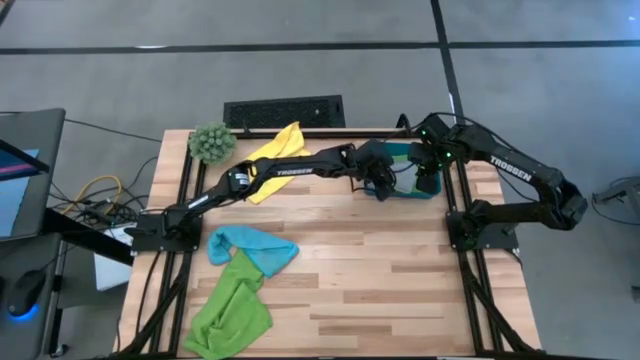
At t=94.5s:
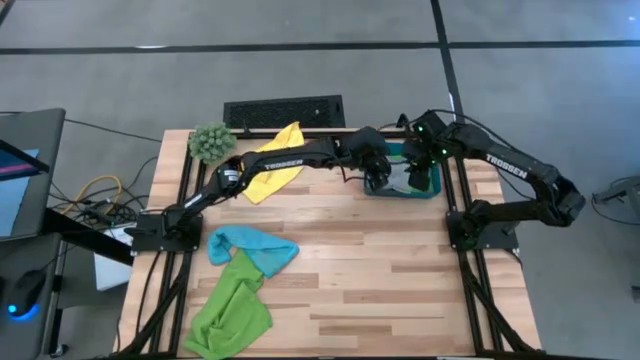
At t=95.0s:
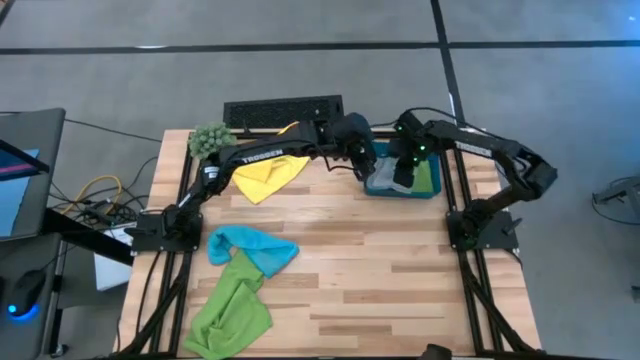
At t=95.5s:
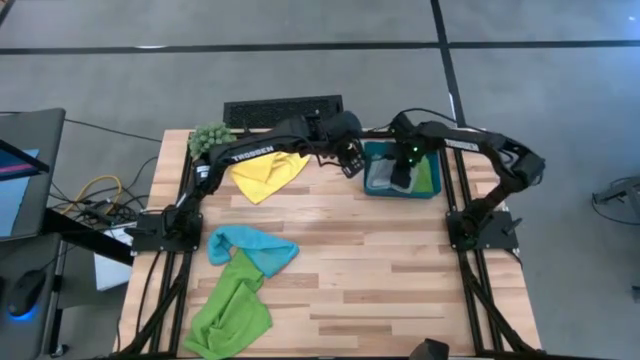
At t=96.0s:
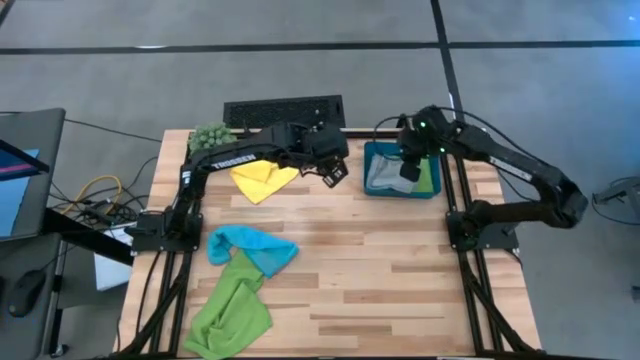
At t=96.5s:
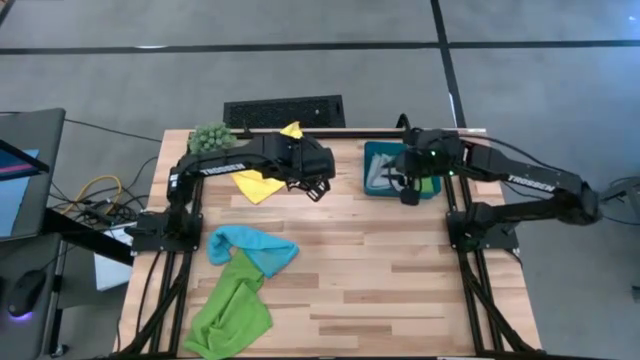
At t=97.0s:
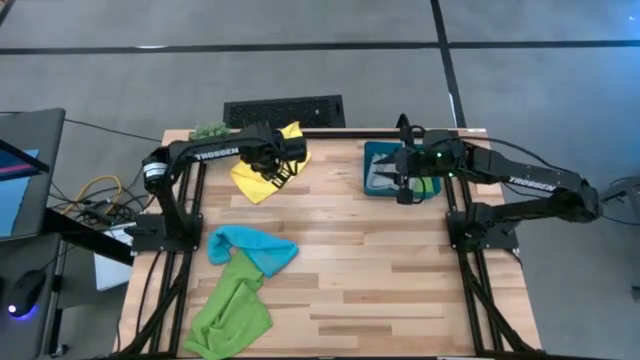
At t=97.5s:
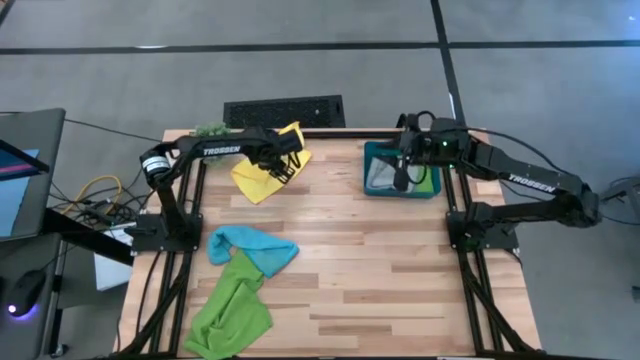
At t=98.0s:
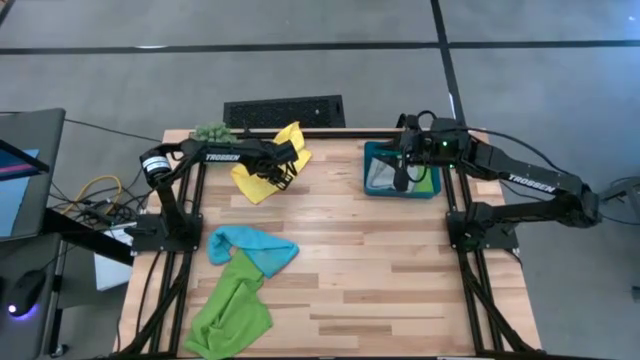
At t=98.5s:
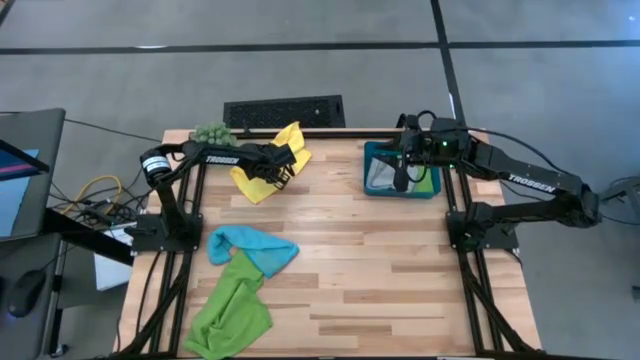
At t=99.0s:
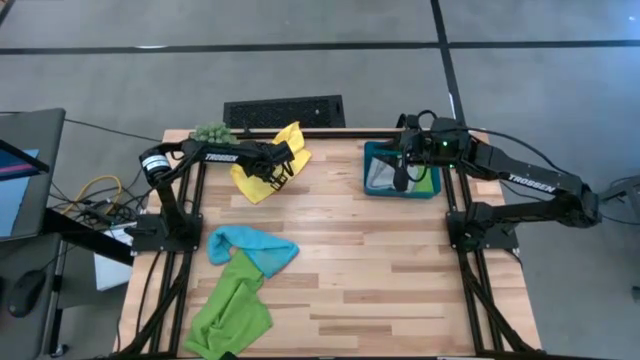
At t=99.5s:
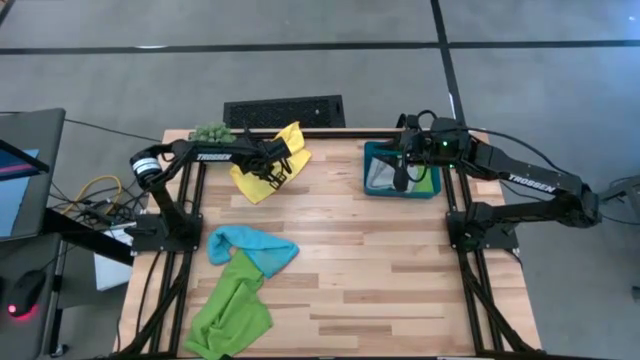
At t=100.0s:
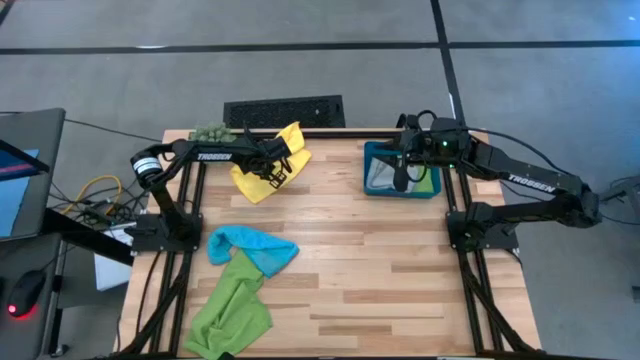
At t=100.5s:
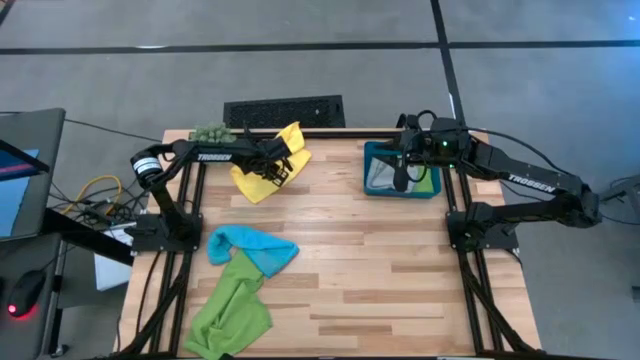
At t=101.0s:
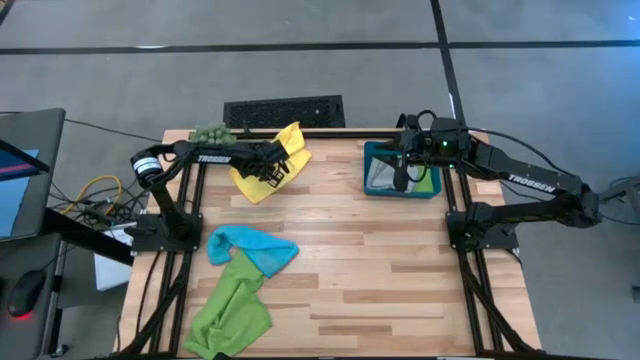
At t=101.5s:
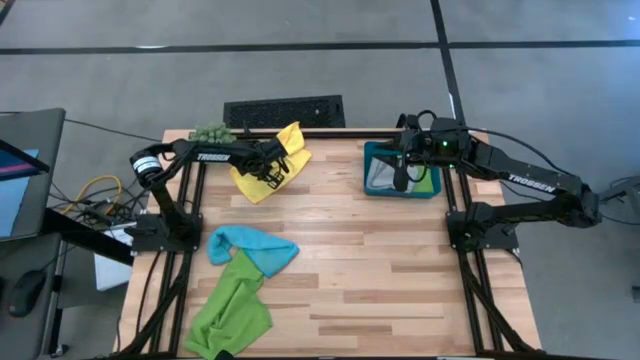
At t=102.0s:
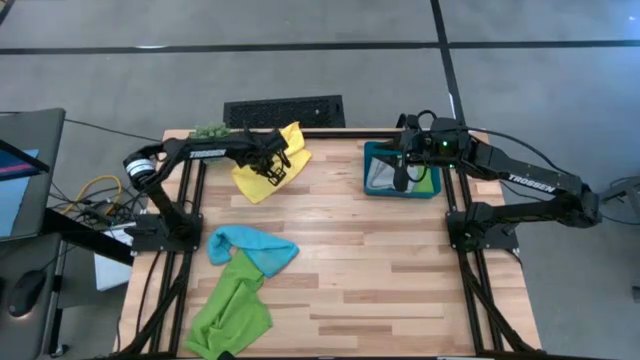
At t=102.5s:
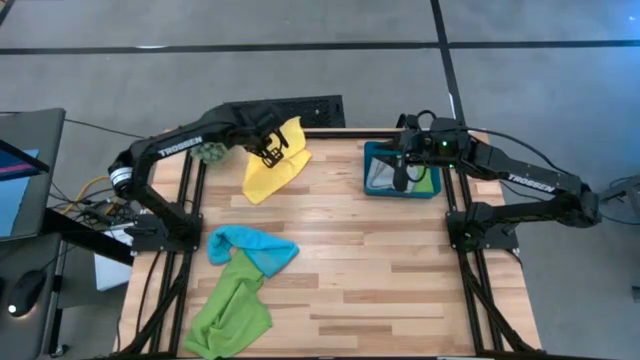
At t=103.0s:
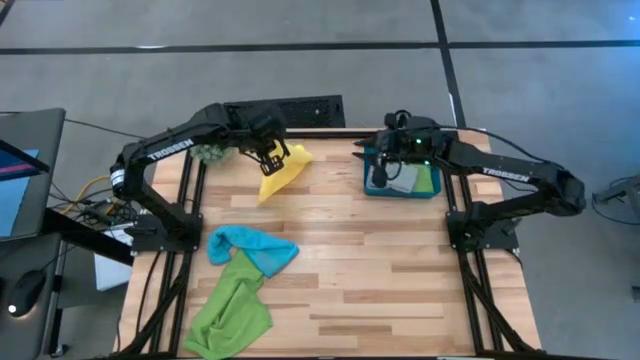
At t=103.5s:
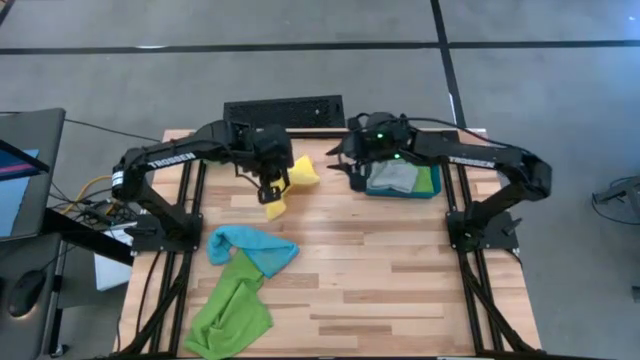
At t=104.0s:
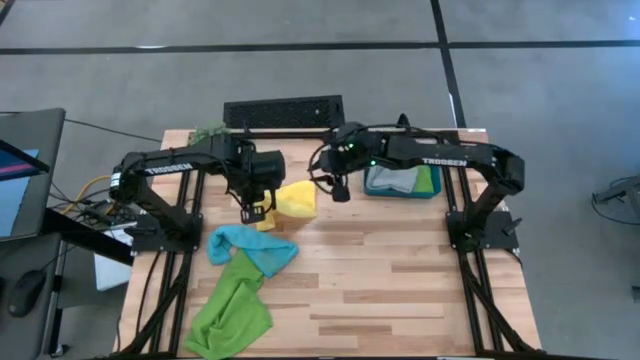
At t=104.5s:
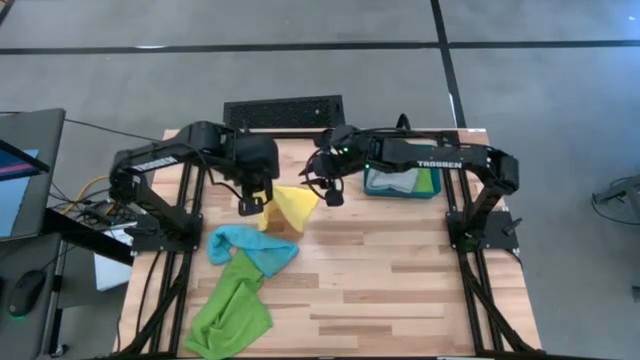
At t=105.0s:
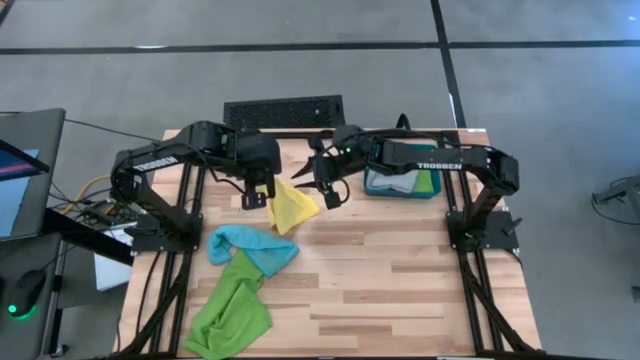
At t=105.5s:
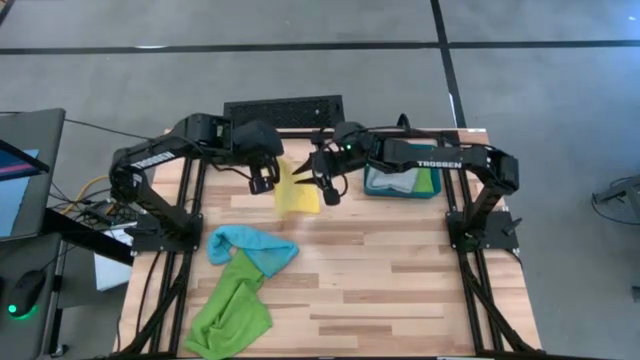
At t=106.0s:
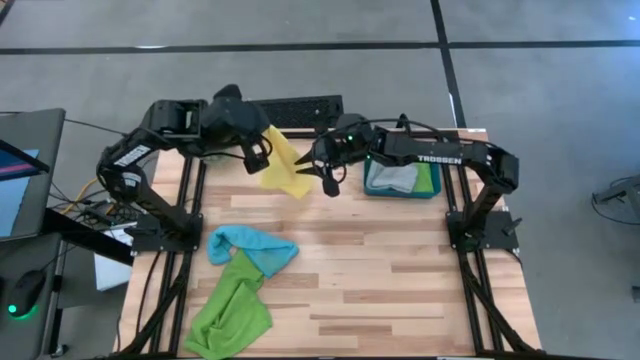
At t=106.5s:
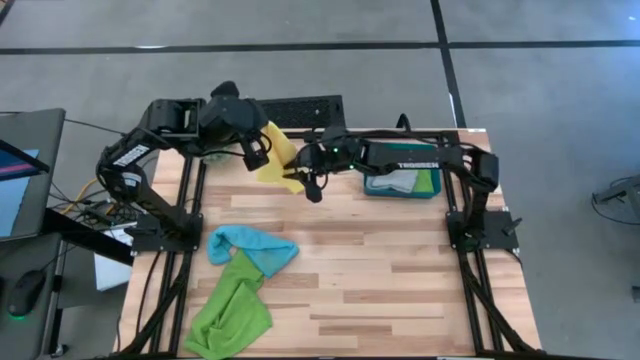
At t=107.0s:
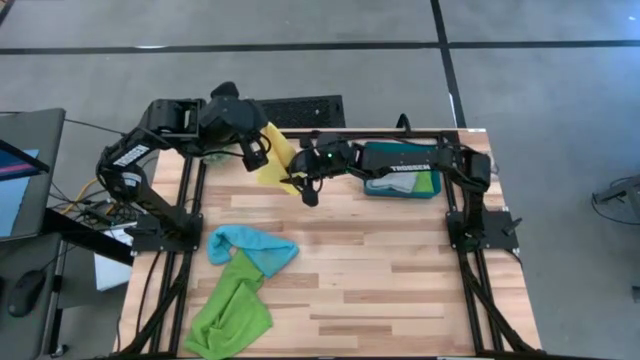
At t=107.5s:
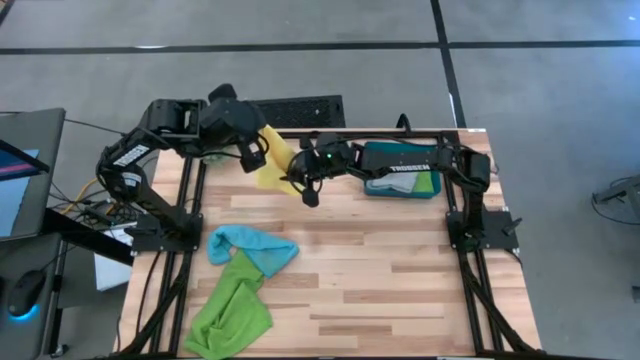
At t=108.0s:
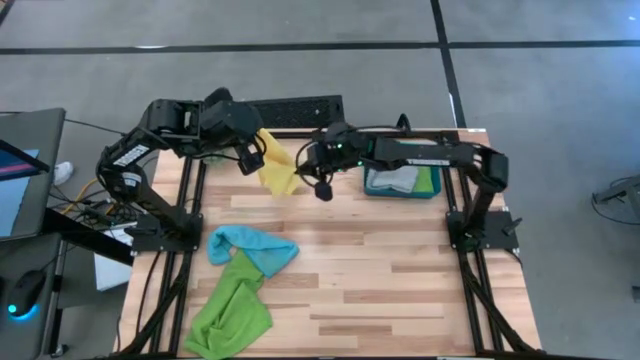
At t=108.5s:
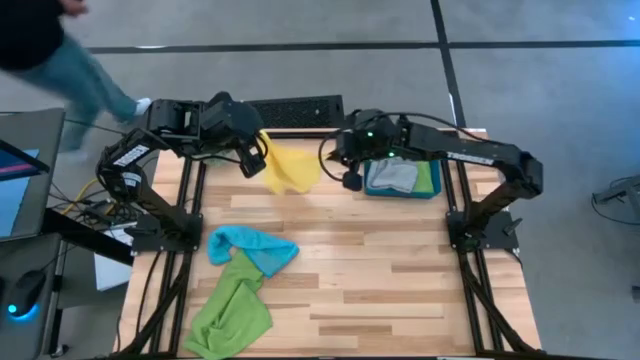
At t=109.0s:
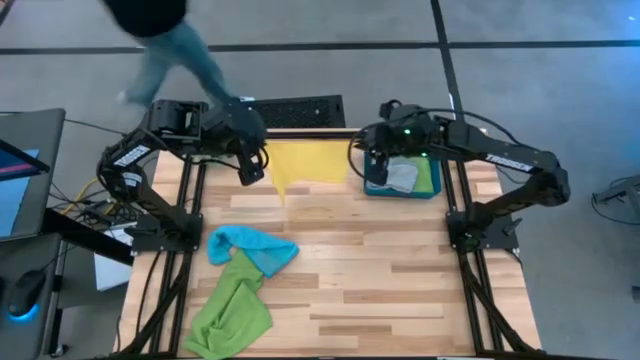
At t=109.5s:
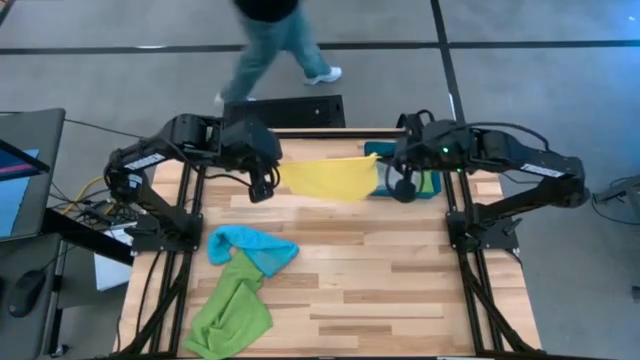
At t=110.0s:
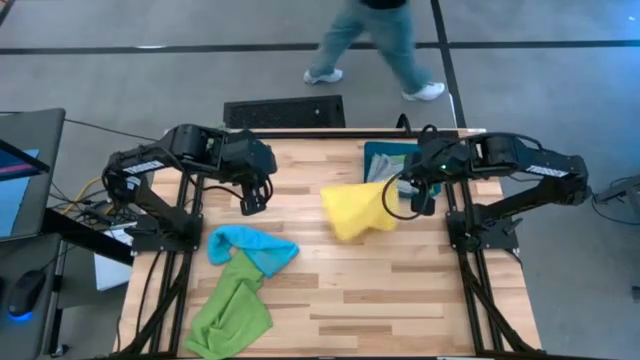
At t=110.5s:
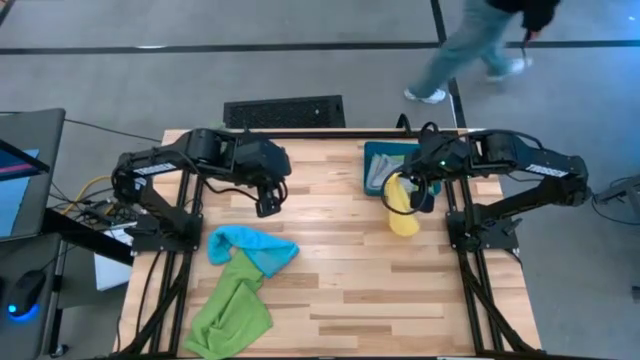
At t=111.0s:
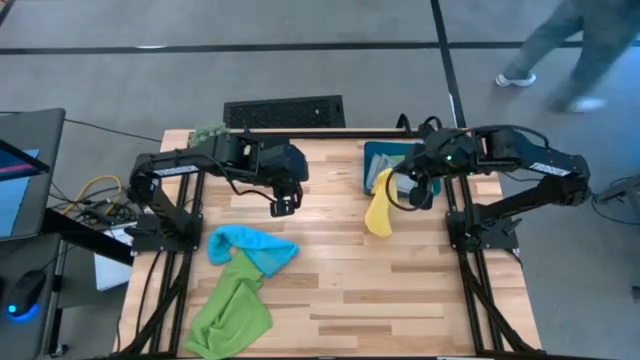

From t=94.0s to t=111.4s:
Task: Fold microfiber towels
Fold the yellow microfiber cloth

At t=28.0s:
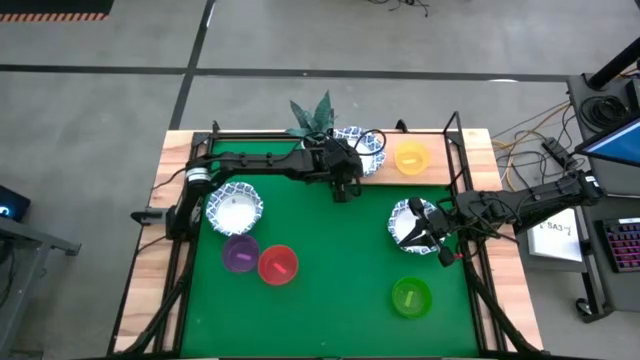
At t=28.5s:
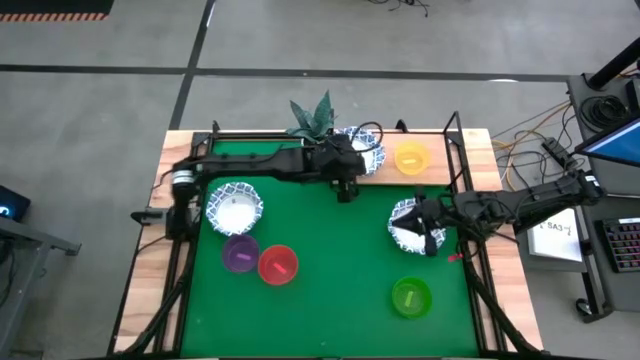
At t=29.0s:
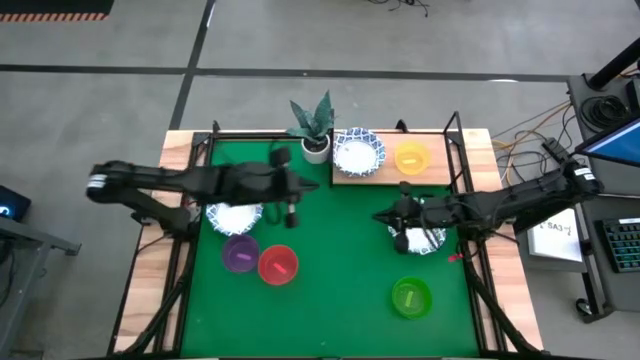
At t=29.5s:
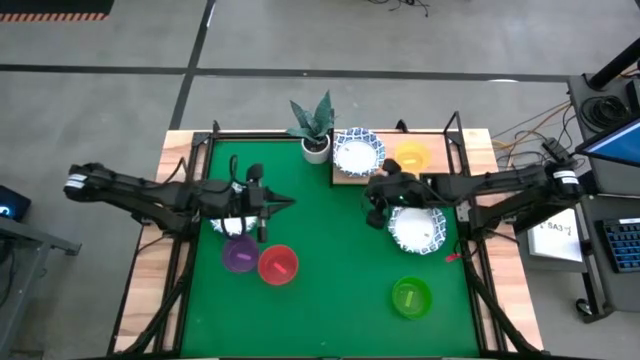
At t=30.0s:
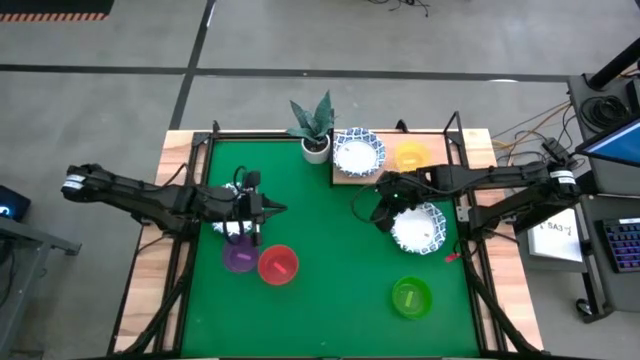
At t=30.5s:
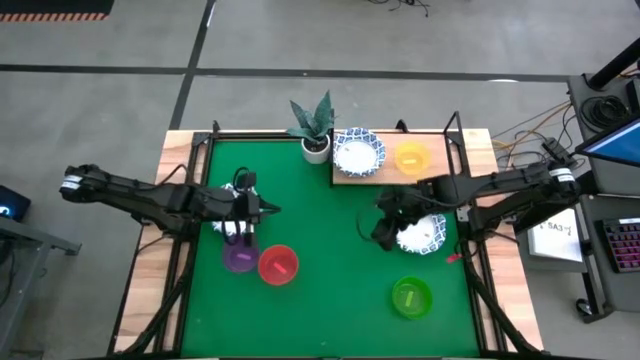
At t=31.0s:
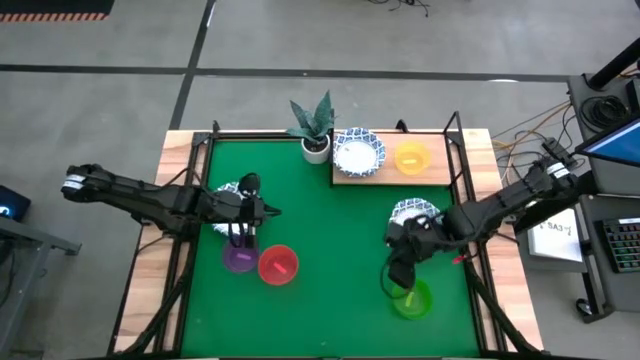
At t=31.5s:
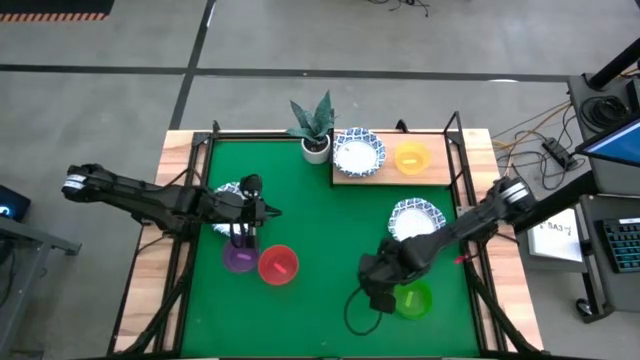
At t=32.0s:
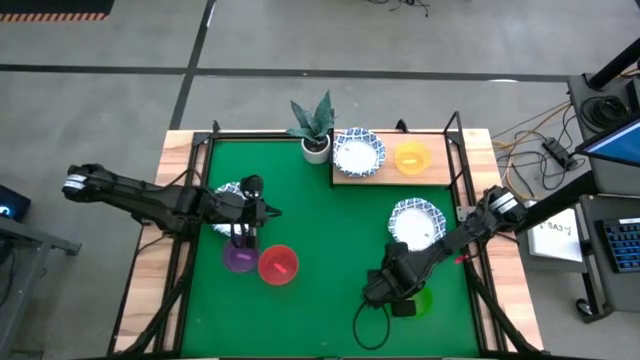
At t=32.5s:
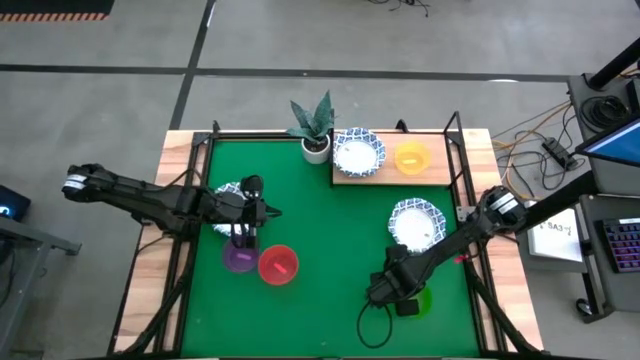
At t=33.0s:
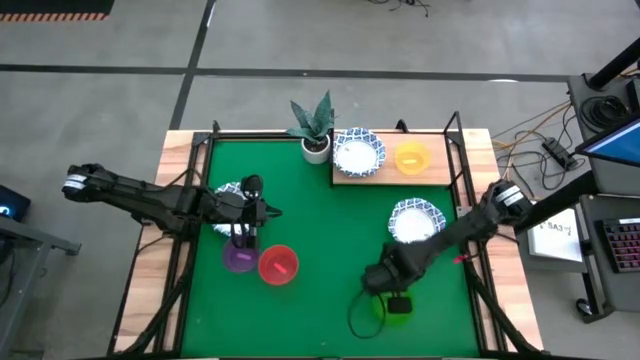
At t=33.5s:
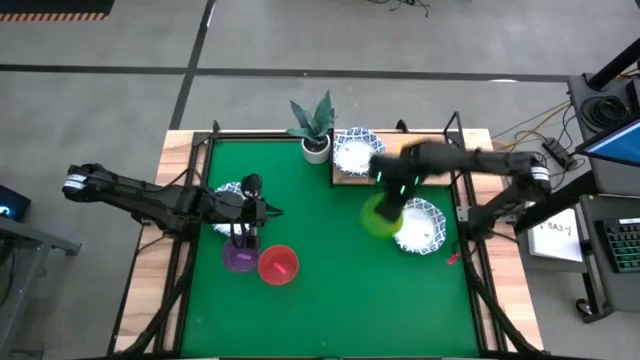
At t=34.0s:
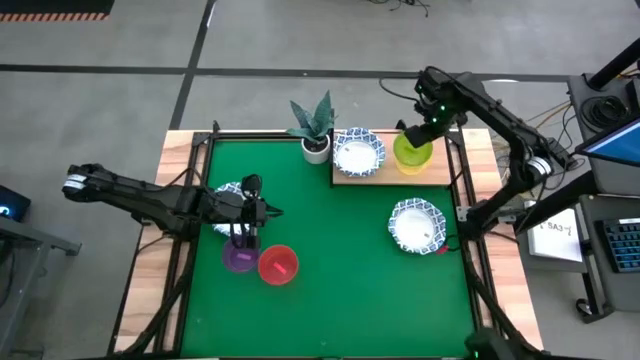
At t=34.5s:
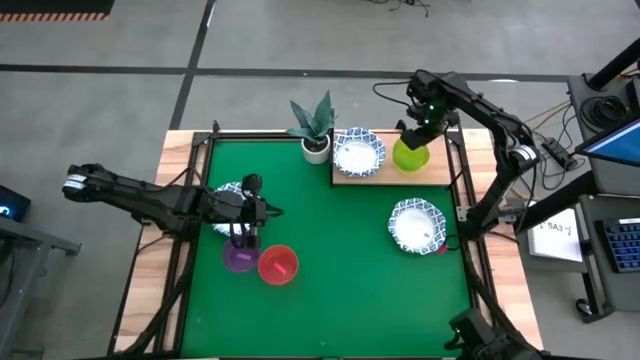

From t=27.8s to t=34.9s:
Task: Place and stack bowls onto a shelf
Stack the green bowl on top of the yellow bowl
